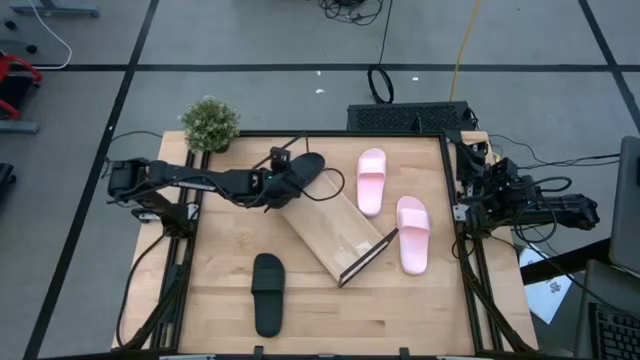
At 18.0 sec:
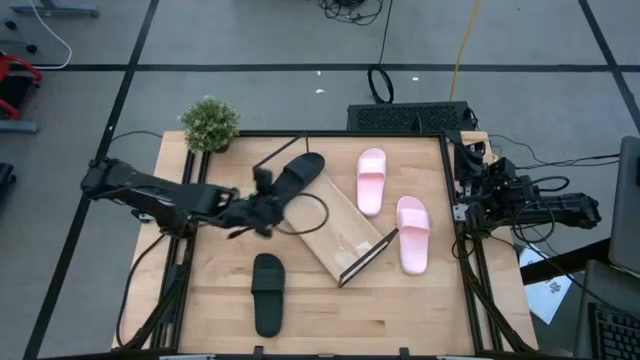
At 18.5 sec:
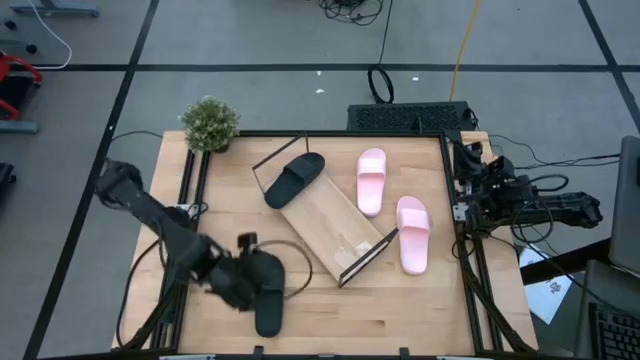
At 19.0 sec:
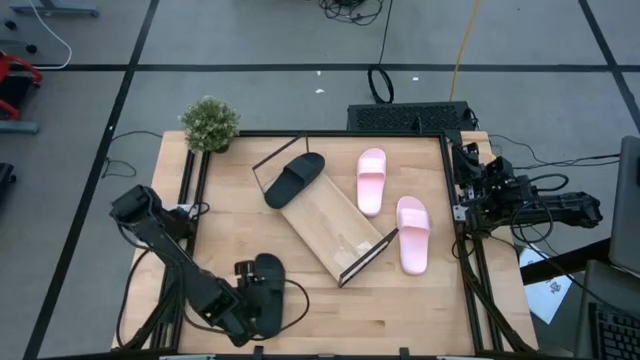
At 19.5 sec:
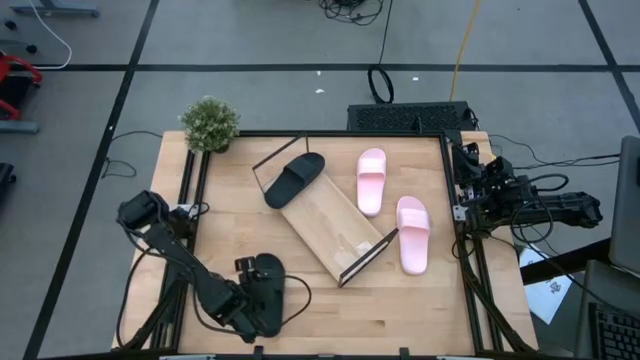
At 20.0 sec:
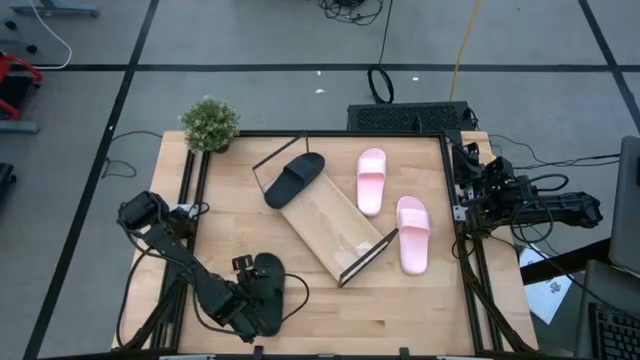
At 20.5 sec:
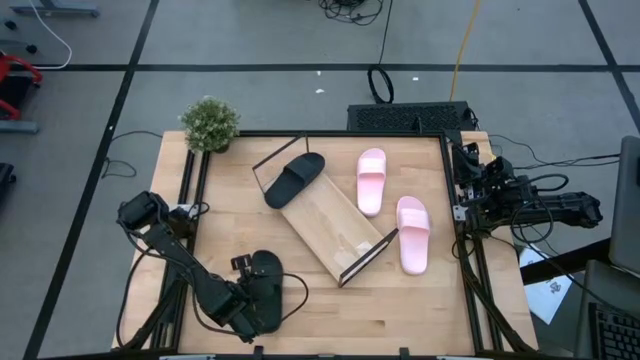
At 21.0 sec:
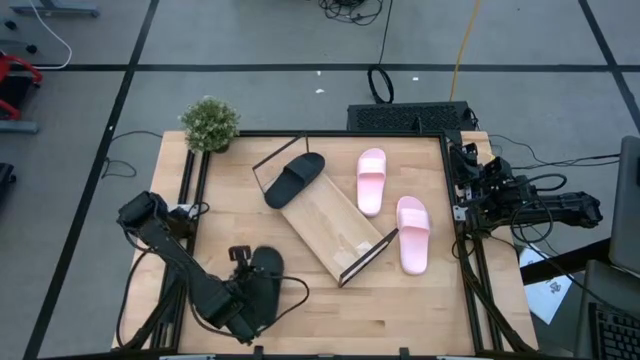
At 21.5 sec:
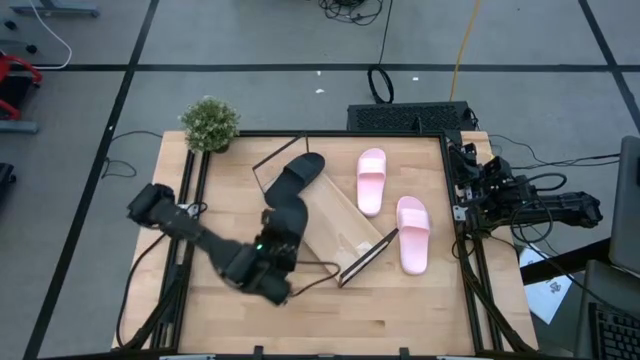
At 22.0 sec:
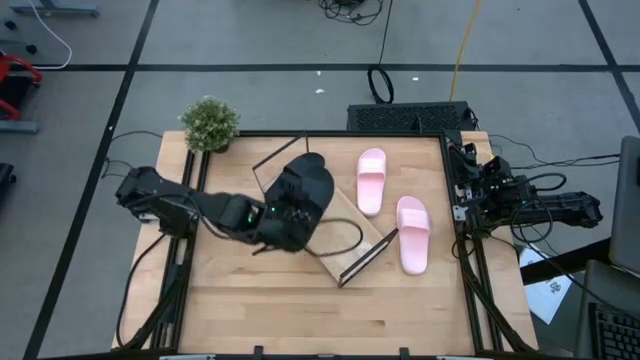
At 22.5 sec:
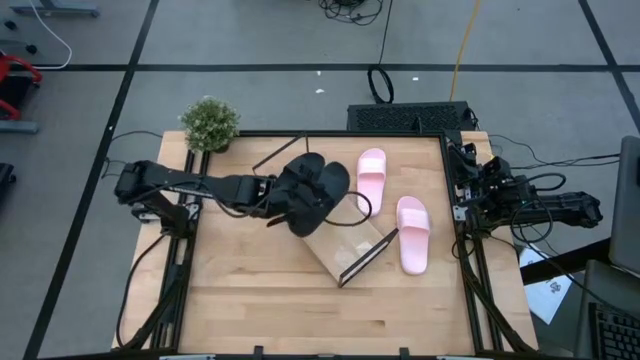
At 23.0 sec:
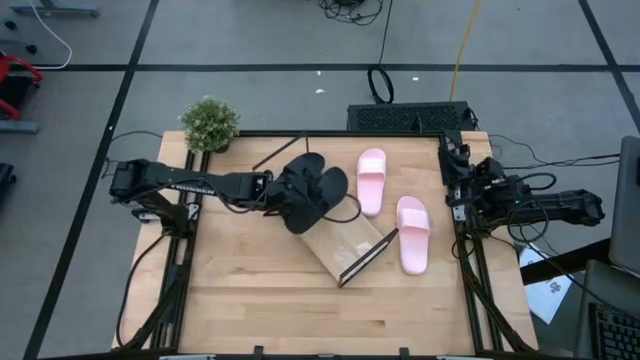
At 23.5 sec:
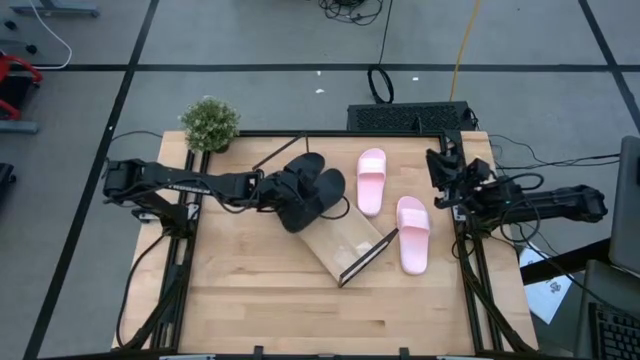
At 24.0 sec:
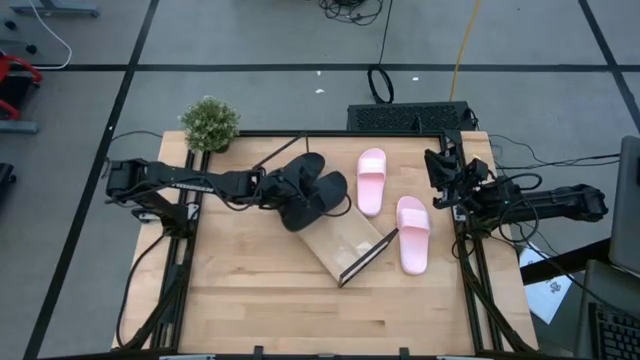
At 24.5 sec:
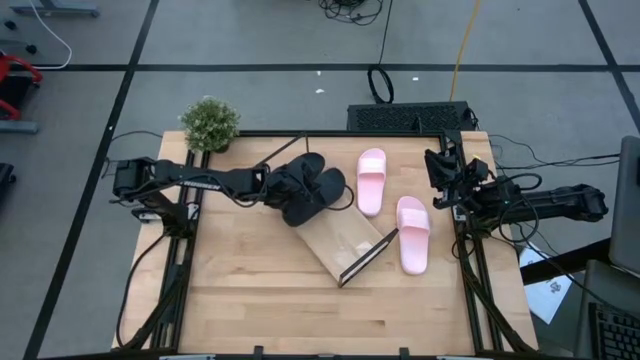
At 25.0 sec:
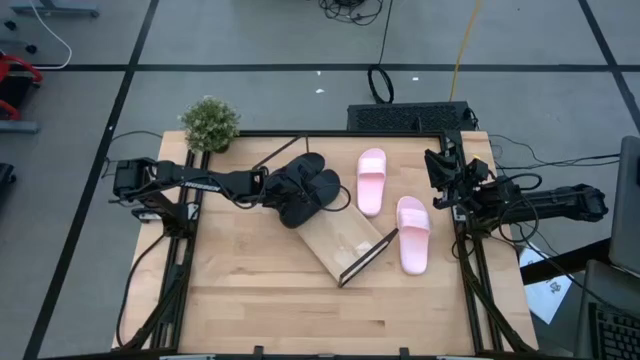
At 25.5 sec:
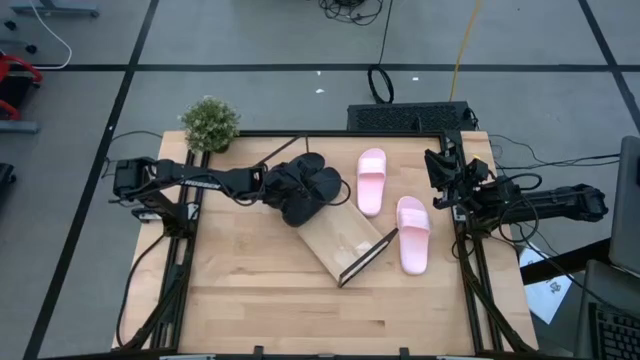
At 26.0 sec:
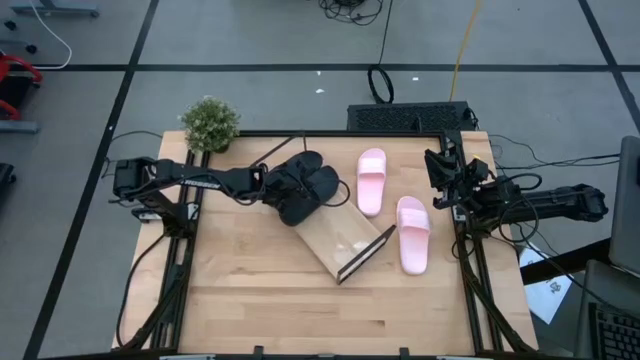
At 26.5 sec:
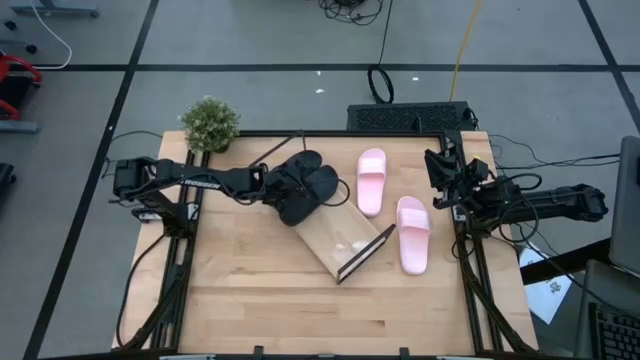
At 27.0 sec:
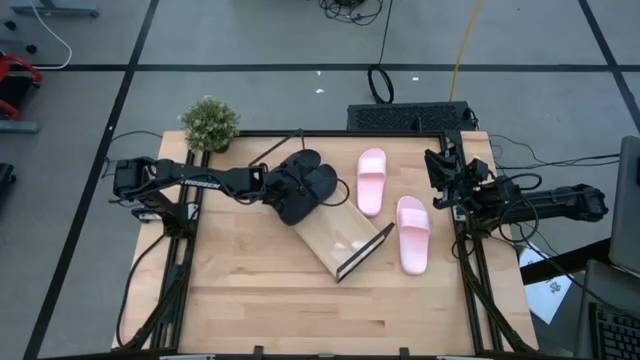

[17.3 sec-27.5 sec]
Task: Pick and place slides into the shelf
Put the black slipper on the shelf

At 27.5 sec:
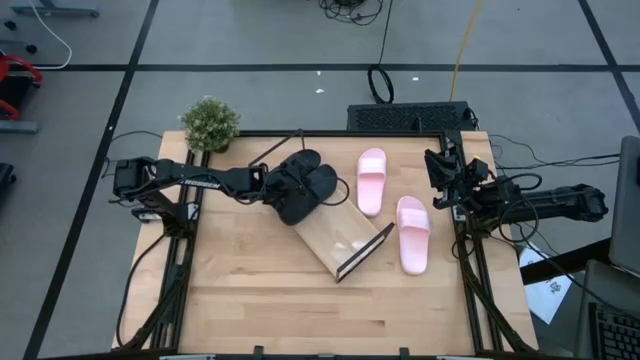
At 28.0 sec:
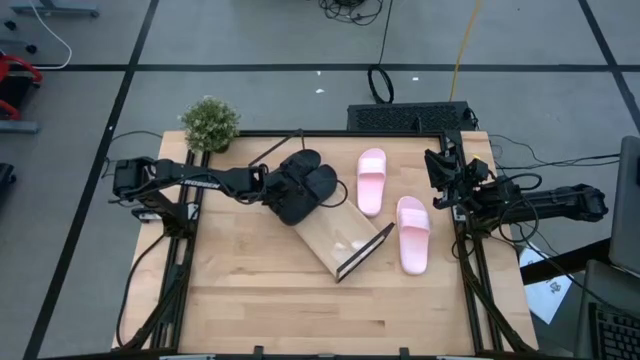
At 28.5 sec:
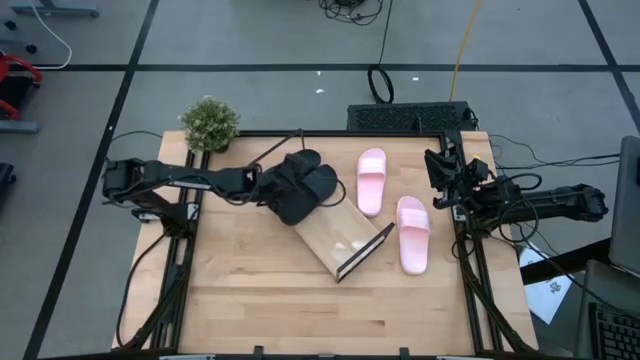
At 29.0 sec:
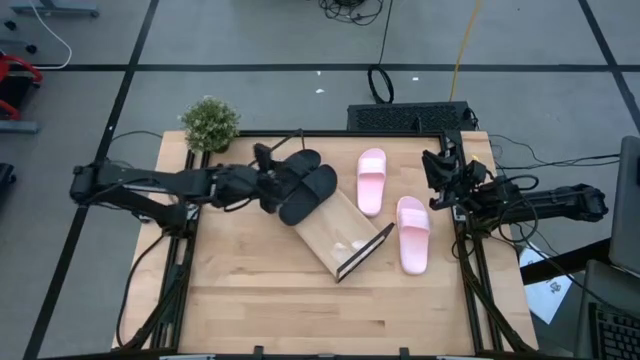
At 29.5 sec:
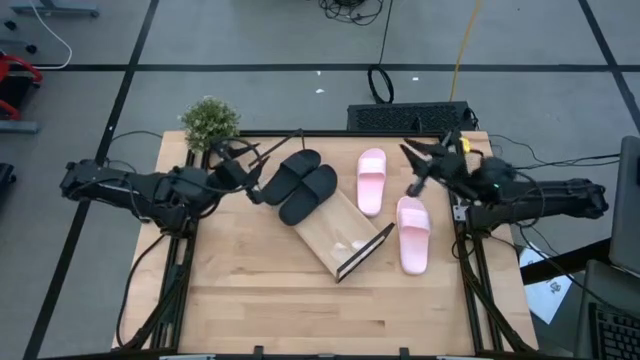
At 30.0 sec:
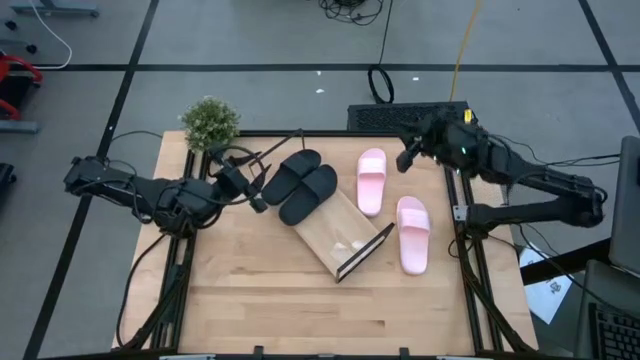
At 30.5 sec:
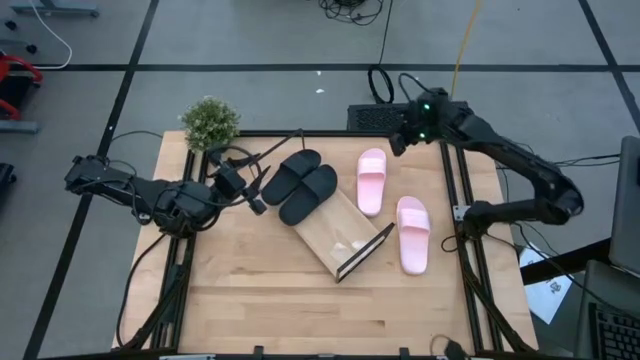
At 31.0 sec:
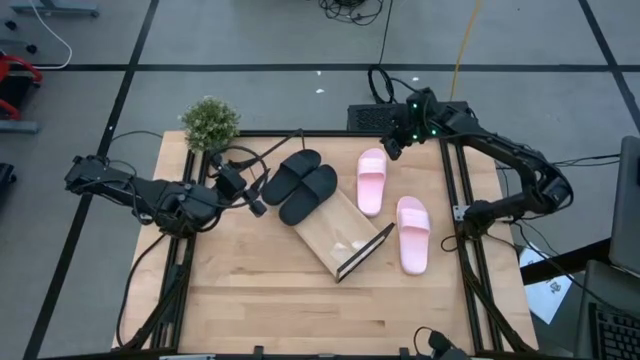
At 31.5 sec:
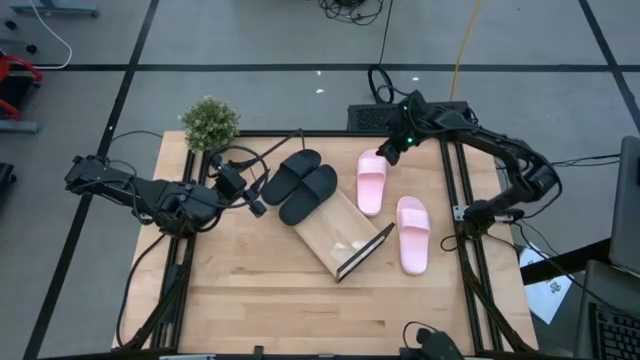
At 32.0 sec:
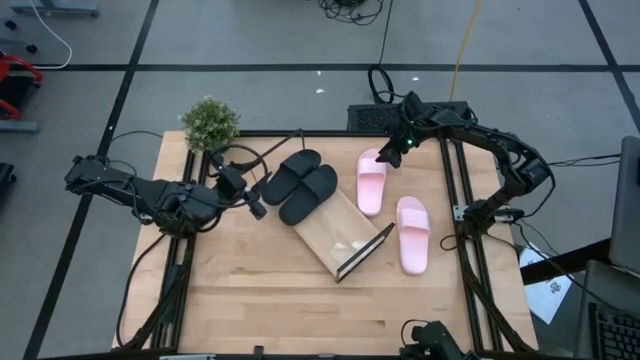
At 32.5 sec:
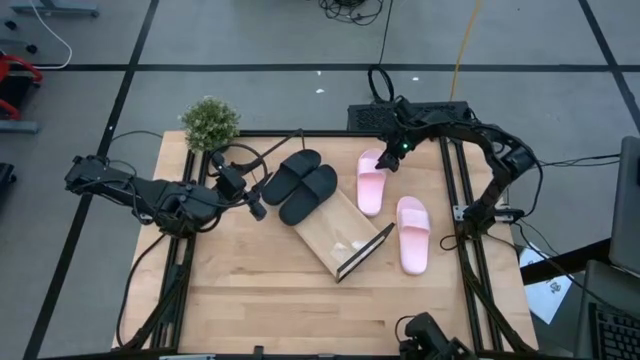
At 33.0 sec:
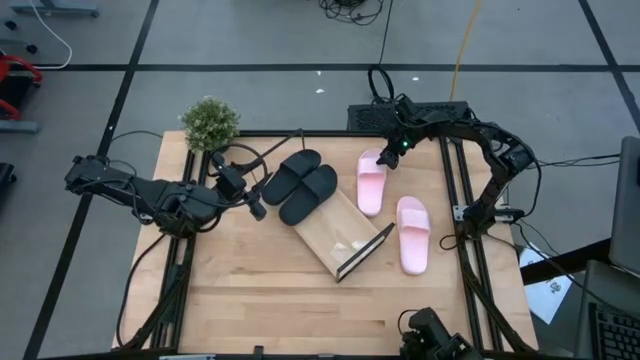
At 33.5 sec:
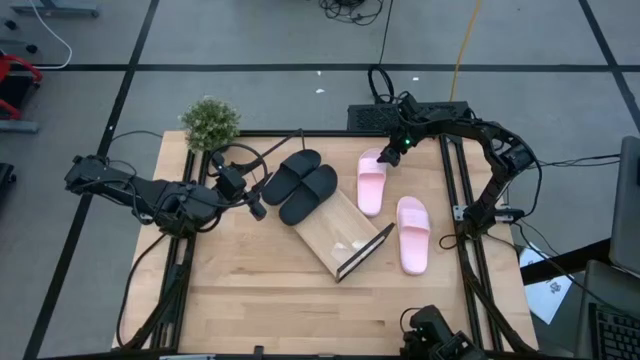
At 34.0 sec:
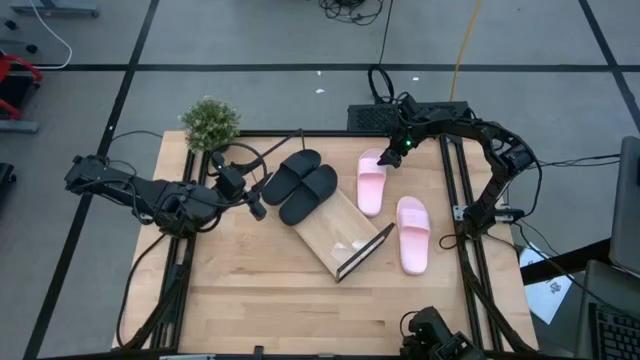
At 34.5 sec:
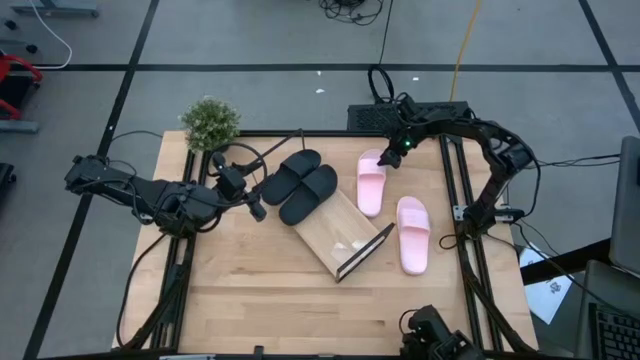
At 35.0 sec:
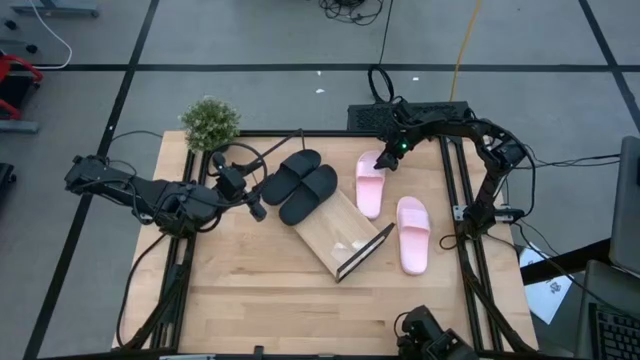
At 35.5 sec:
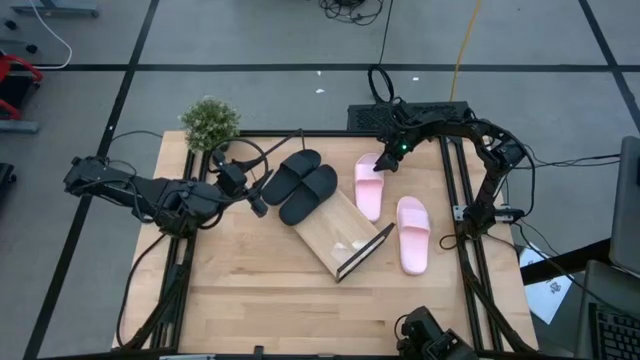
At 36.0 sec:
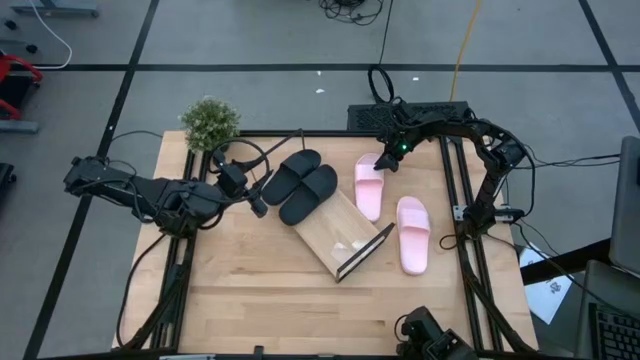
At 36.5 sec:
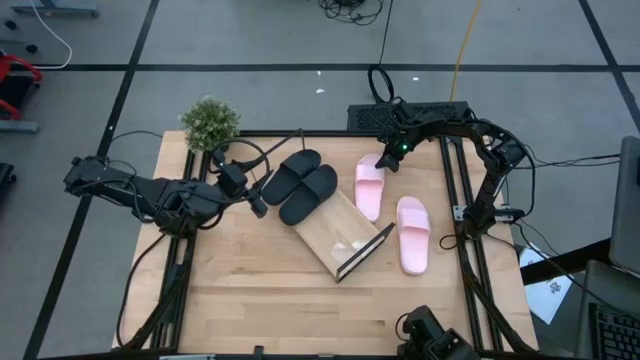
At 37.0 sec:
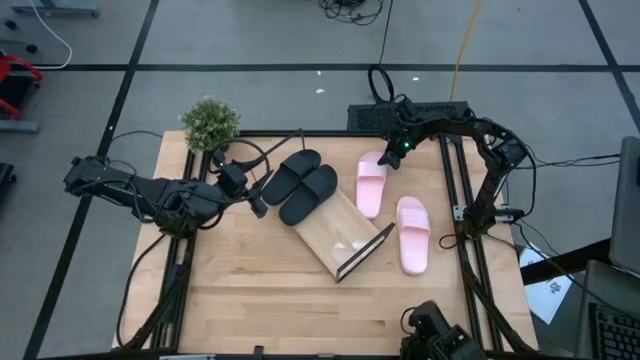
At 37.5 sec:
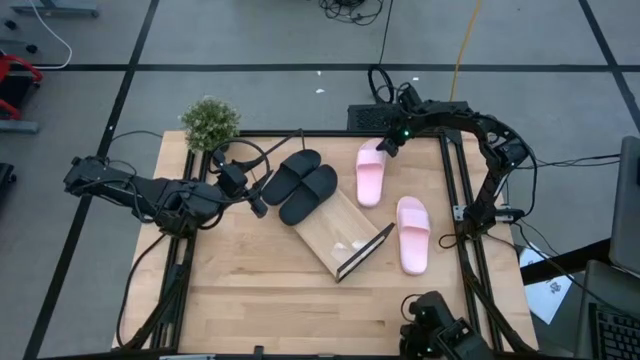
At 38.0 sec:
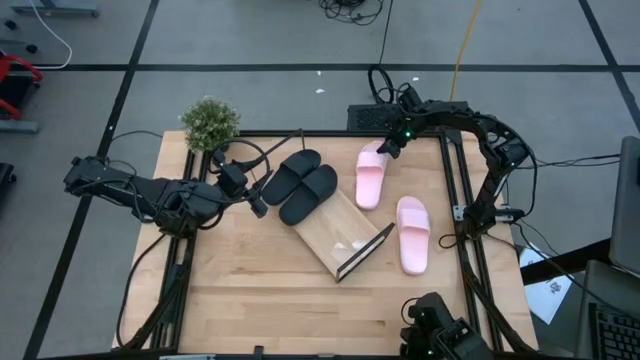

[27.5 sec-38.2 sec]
Put the left pink slipper on the shelf
